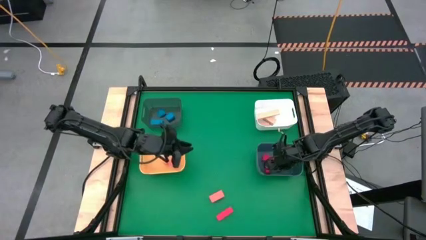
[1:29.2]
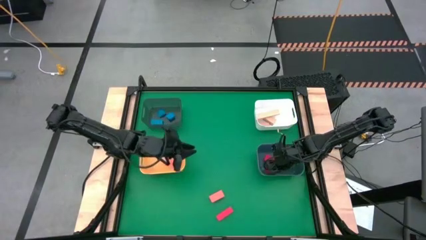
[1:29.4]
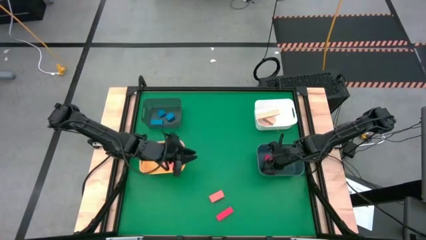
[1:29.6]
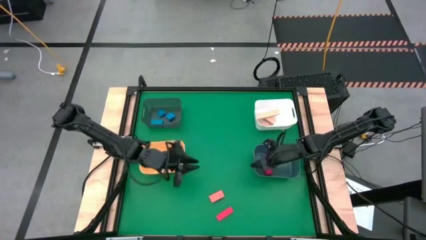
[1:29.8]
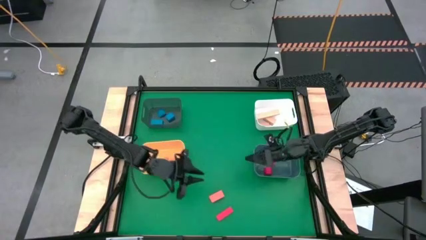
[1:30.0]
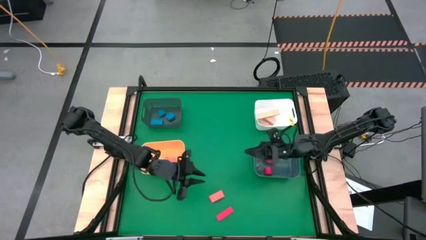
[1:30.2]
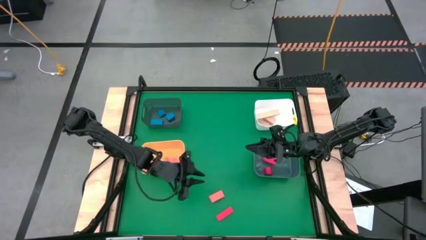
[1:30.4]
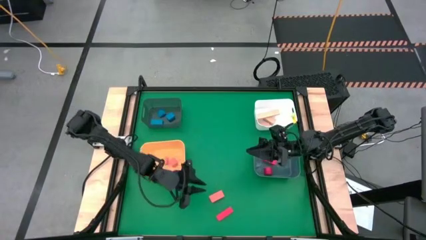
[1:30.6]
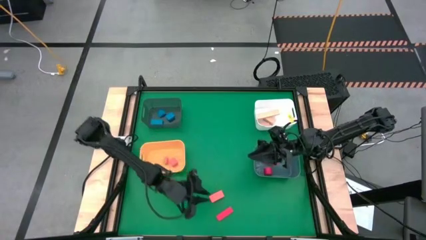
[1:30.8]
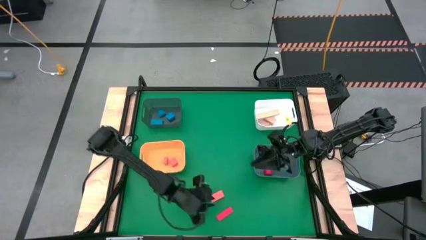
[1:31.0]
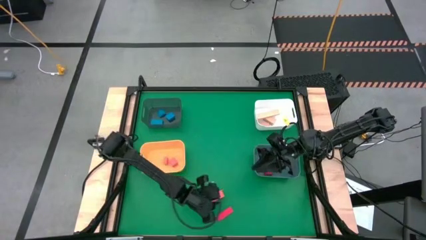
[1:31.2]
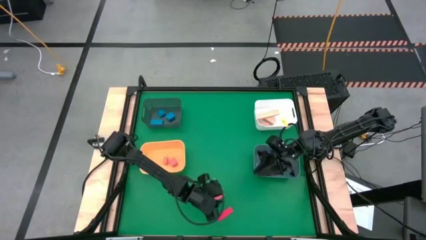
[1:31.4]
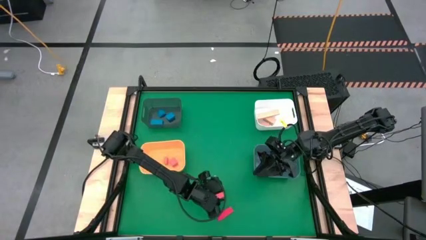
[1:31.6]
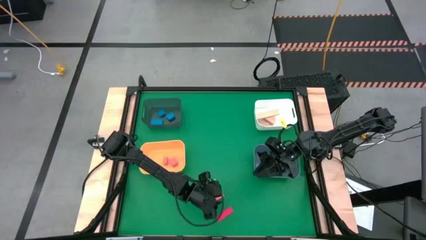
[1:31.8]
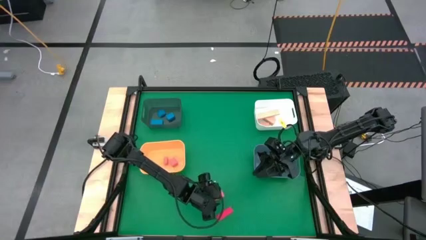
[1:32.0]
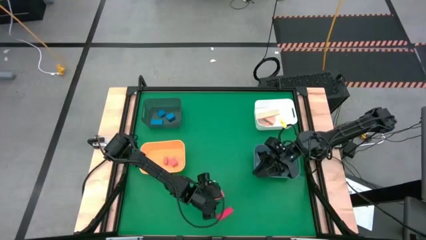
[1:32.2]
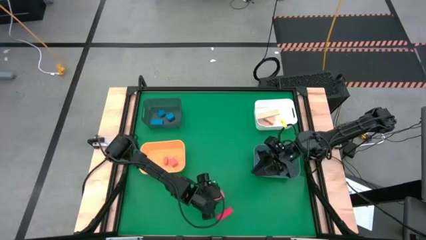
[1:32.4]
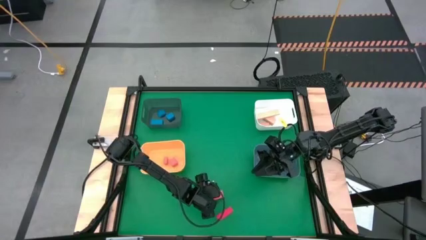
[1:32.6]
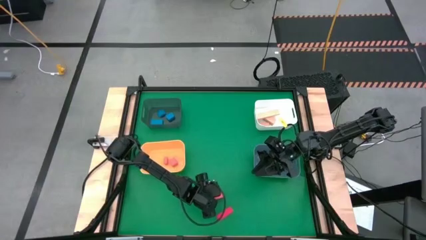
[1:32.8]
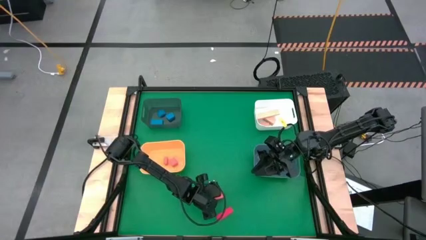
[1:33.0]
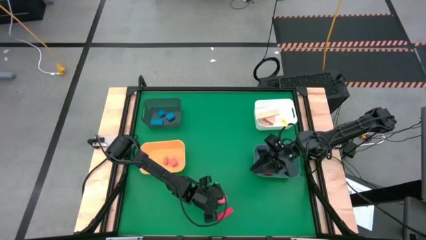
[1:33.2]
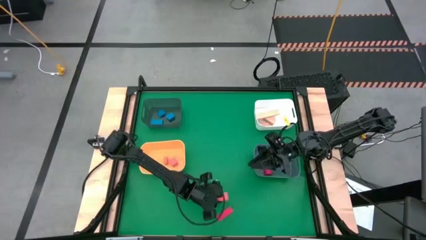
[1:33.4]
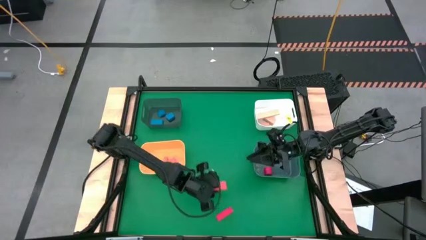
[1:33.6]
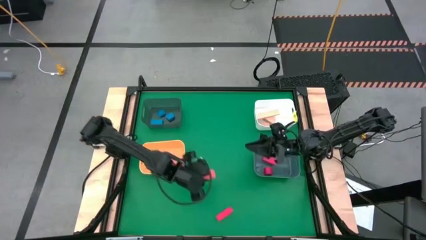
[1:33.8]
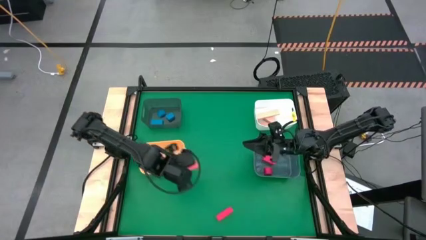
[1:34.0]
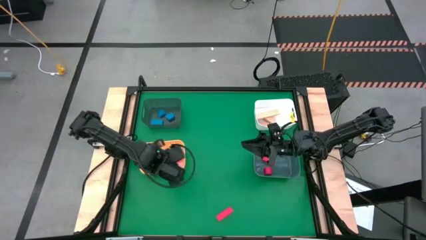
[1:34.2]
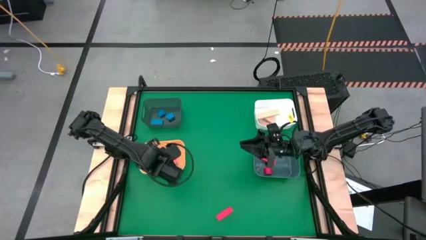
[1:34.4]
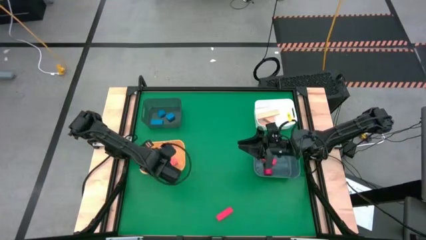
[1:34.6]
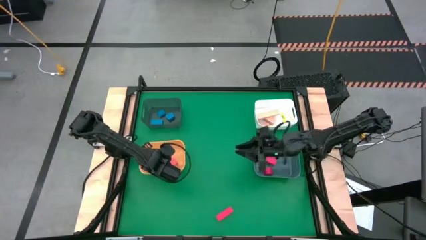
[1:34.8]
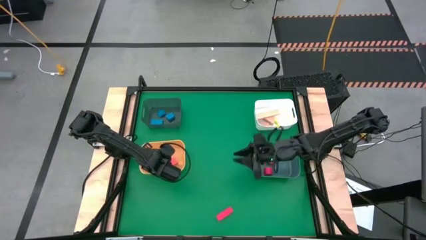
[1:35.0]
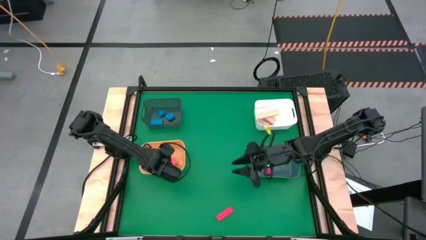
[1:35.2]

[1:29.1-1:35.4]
Task: Sort & place blocks by color
Put the orange block into the yellow bin

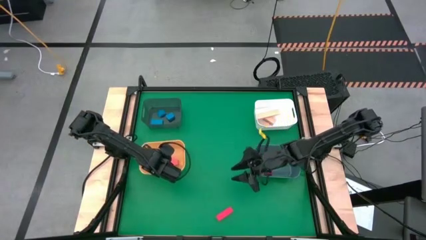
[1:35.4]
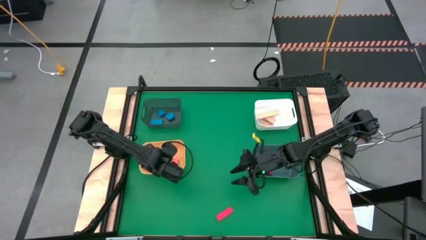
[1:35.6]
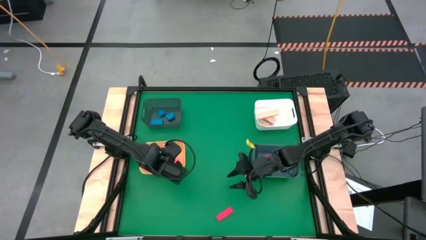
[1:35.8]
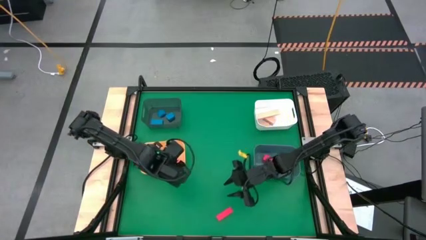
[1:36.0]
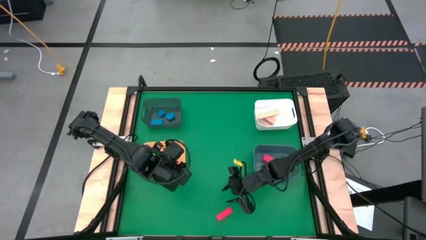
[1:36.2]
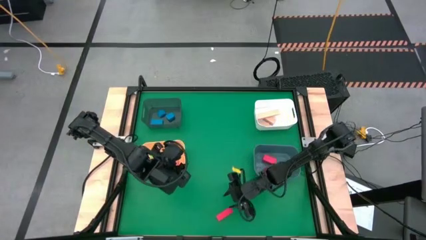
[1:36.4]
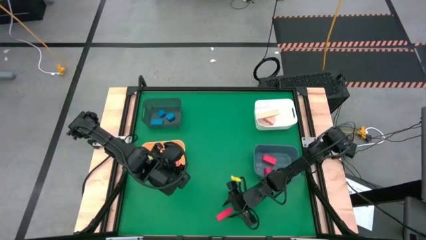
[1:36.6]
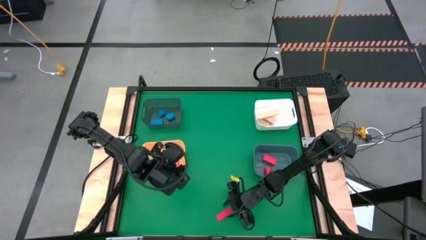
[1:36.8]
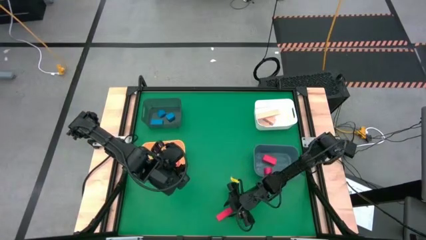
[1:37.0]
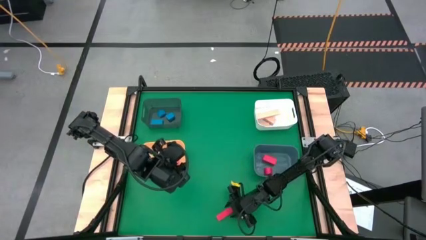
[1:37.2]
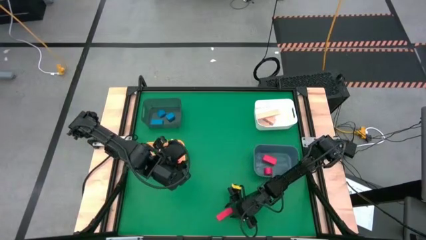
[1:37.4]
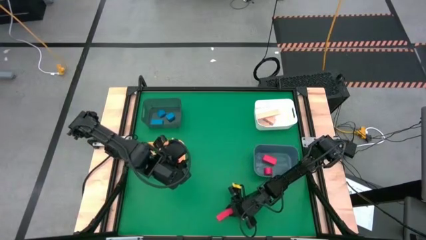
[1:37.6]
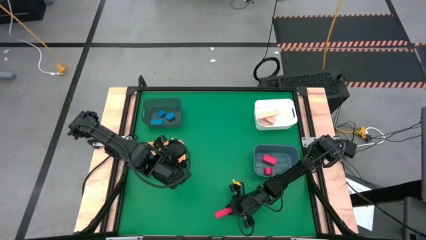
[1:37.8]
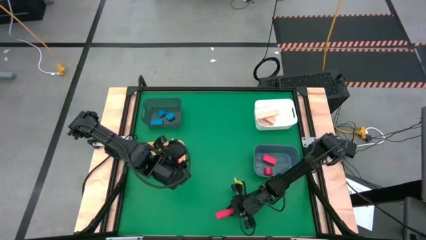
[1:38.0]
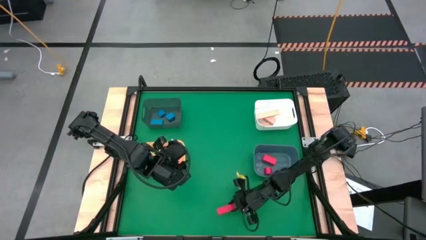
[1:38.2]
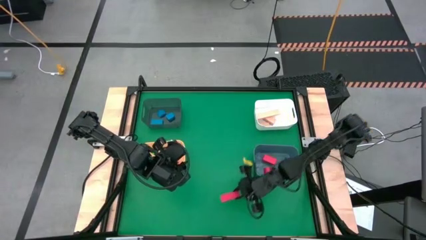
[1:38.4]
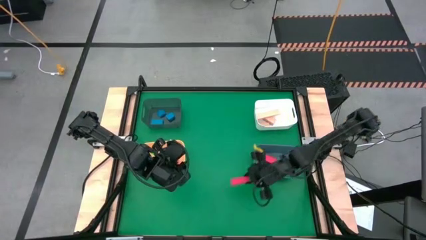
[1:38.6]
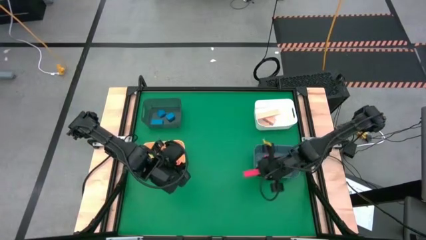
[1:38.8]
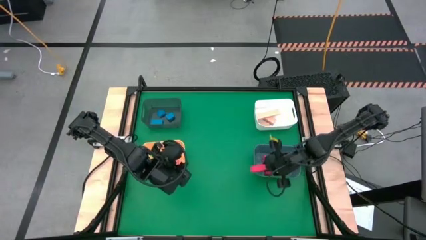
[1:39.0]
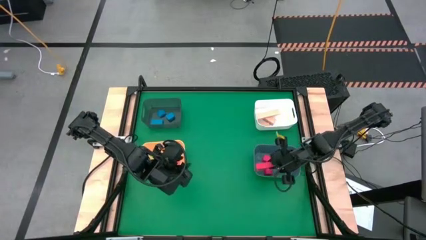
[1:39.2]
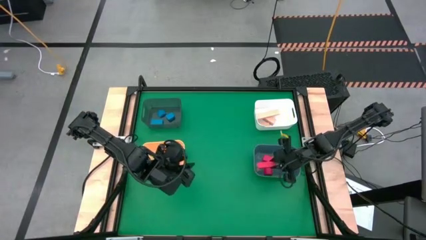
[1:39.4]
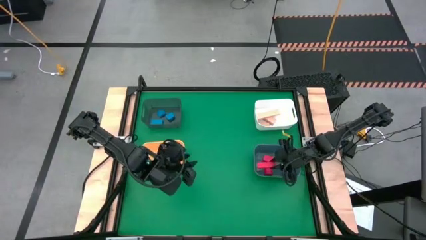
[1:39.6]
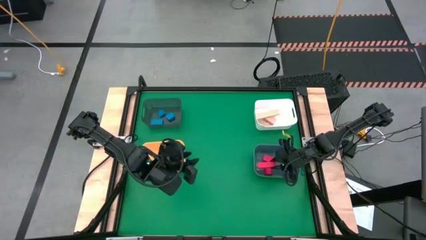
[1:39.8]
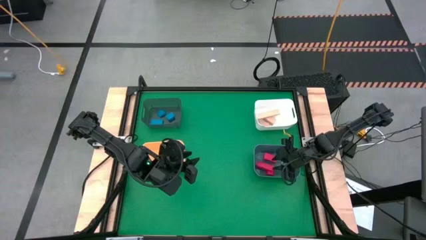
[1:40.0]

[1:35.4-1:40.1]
Put the red block into the green bin

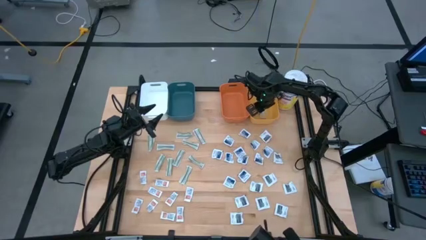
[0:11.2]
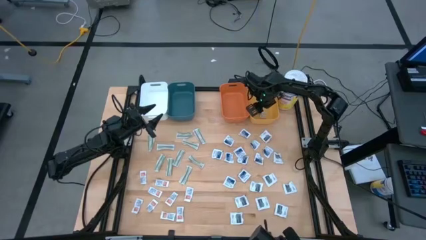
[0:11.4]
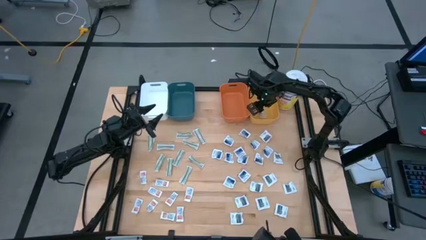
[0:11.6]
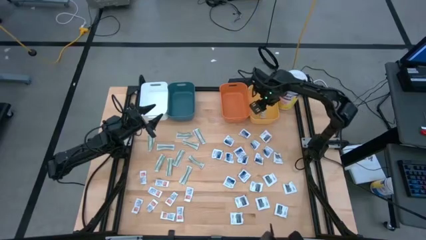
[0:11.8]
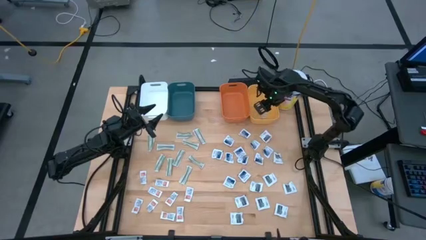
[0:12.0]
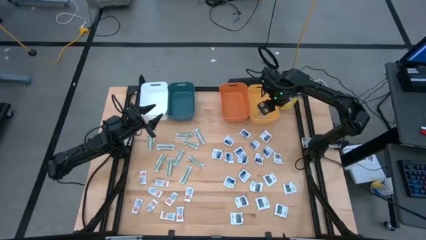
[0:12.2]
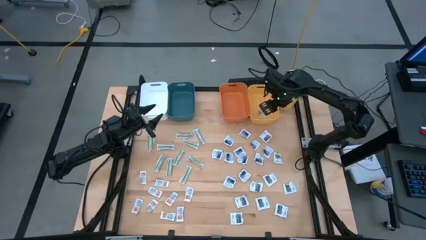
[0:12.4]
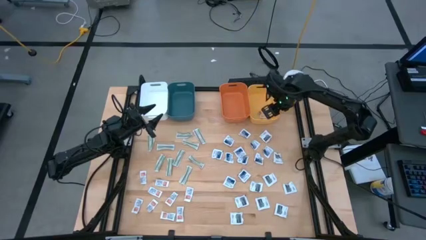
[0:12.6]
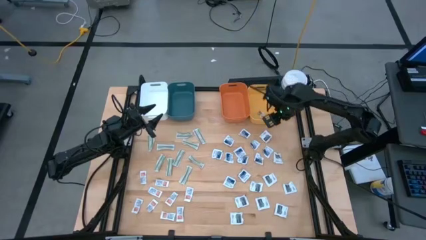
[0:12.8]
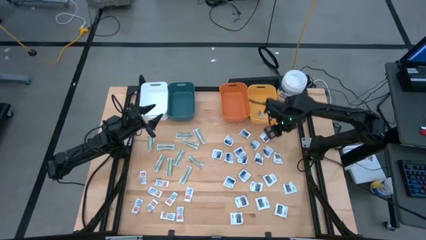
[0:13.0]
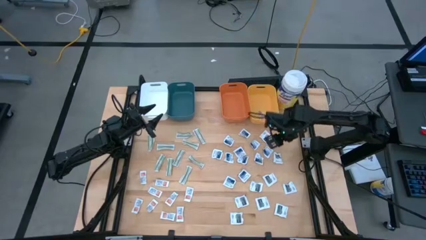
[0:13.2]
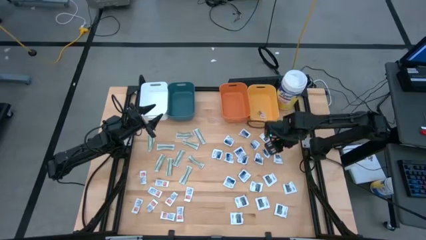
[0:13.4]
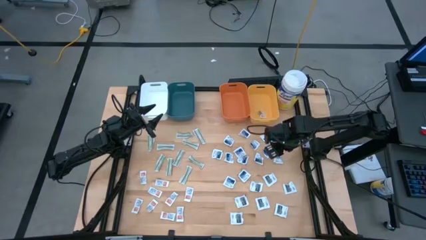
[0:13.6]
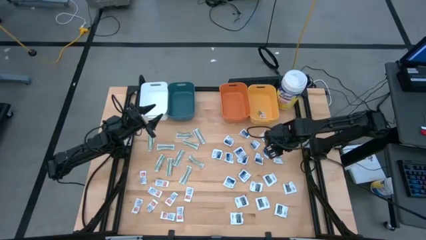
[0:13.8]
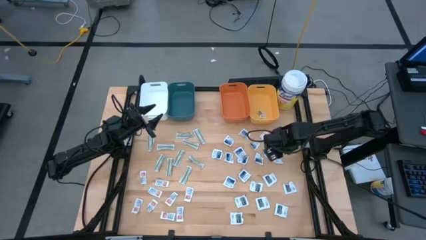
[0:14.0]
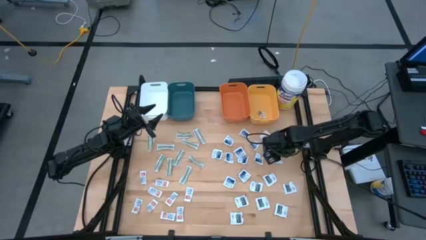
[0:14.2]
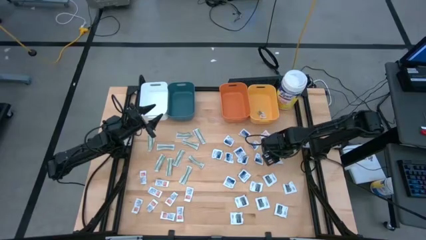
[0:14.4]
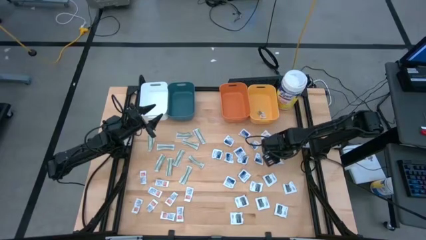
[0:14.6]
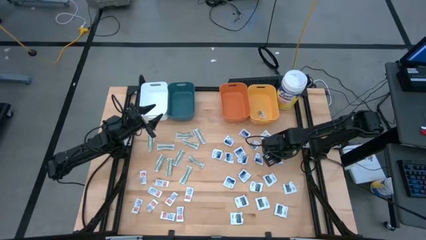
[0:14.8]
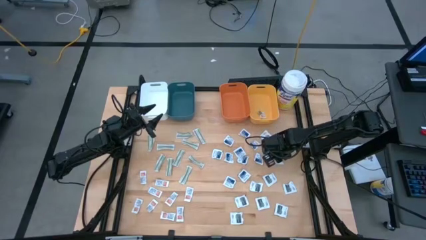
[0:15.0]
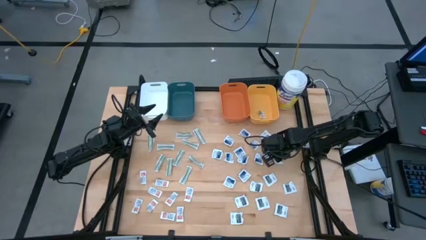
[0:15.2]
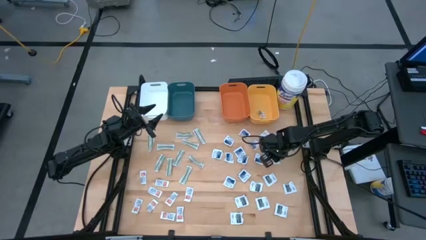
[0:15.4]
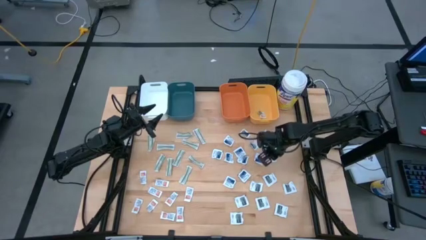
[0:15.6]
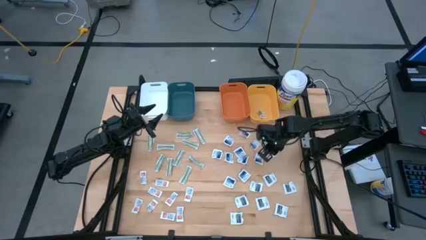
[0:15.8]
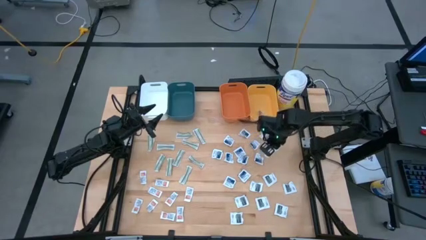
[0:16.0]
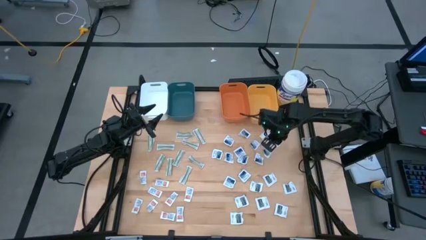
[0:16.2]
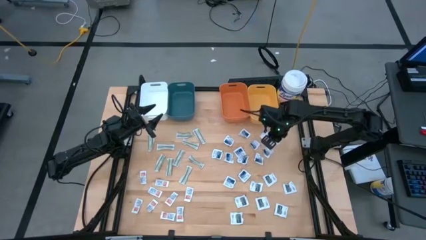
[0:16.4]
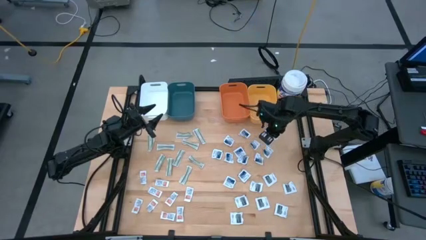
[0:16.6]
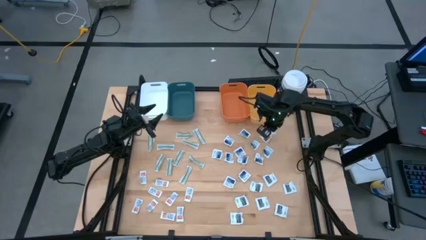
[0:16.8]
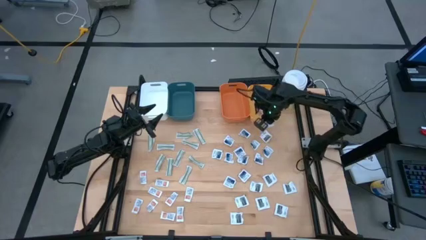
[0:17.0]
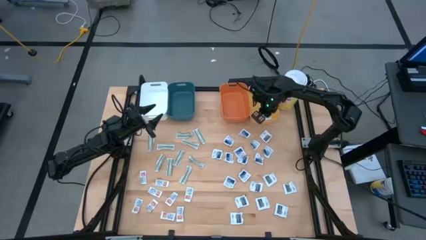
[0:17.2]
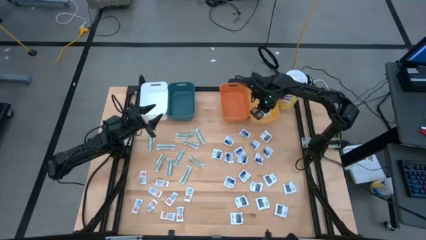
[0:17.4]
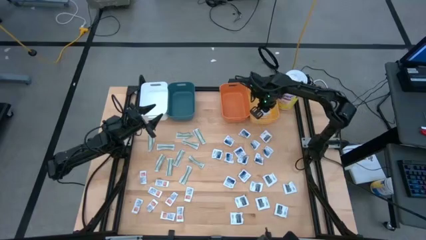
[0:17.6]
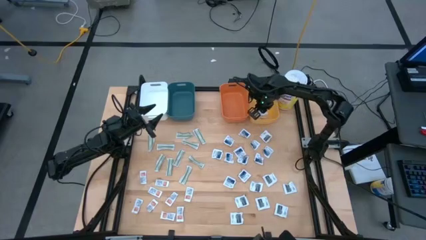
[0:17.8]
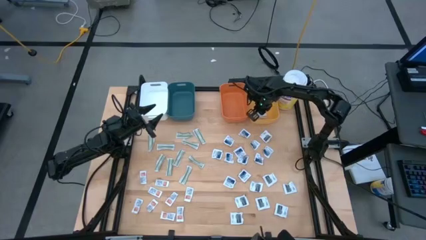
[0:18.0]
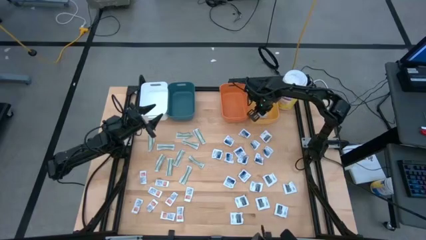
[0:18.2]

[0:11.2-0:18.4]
Task: Pick & Place First Aid Supplies
Put the towelette pack into the yellow bin
